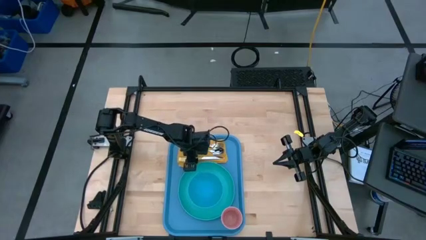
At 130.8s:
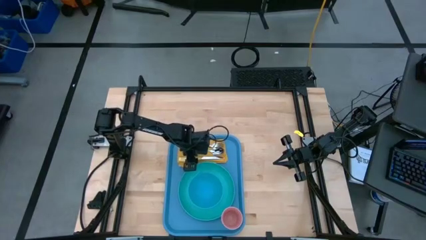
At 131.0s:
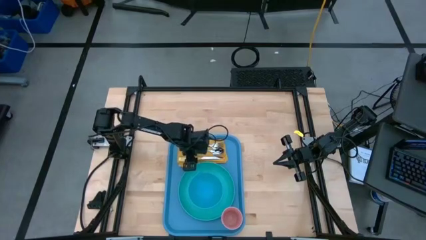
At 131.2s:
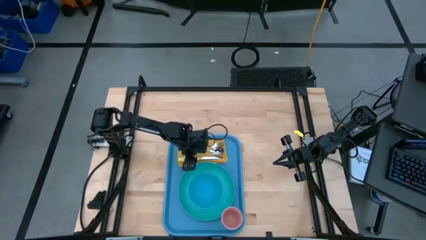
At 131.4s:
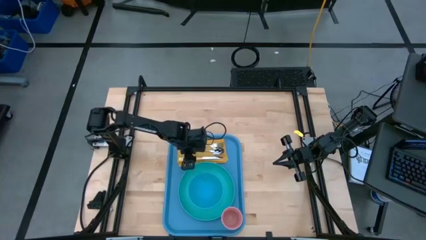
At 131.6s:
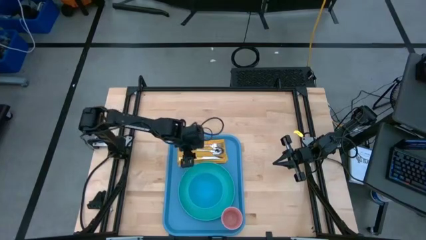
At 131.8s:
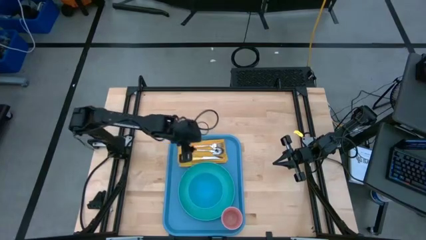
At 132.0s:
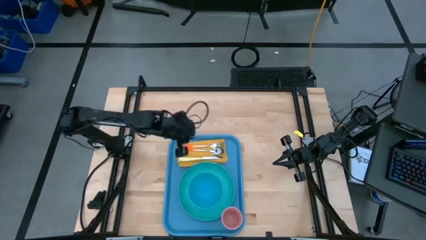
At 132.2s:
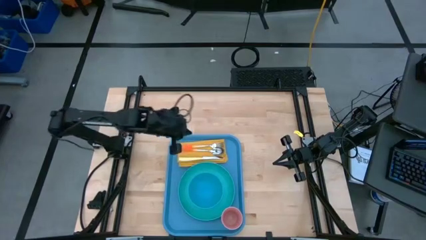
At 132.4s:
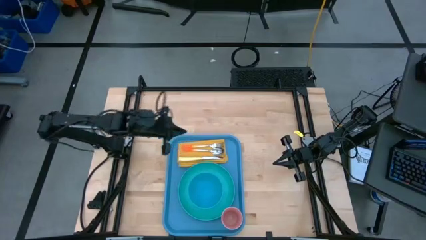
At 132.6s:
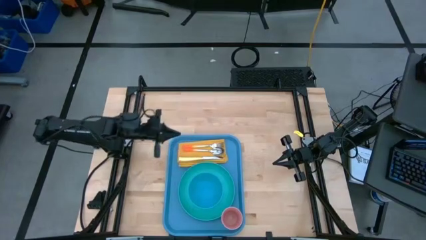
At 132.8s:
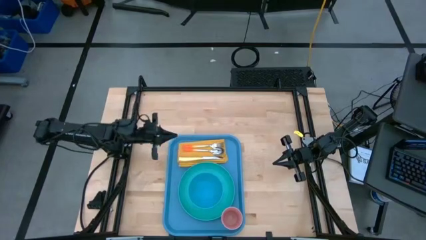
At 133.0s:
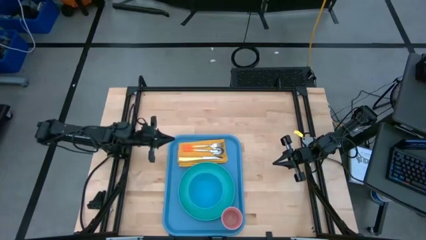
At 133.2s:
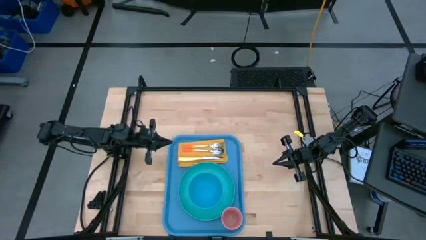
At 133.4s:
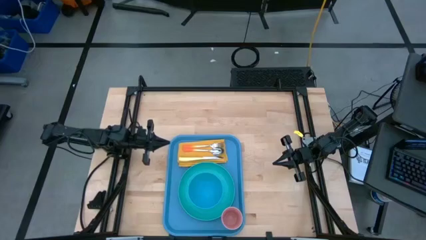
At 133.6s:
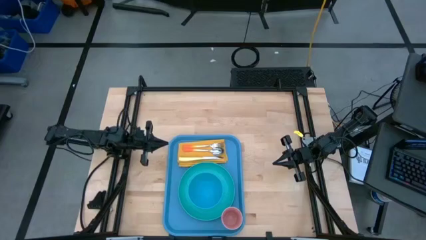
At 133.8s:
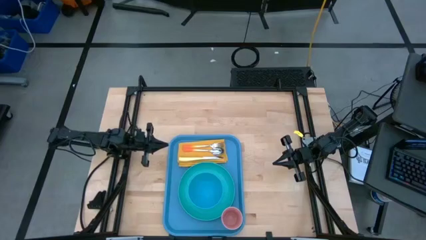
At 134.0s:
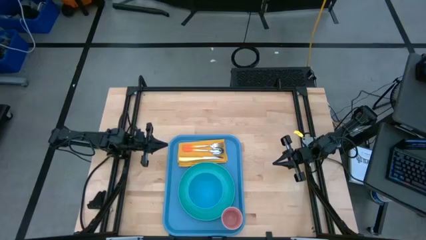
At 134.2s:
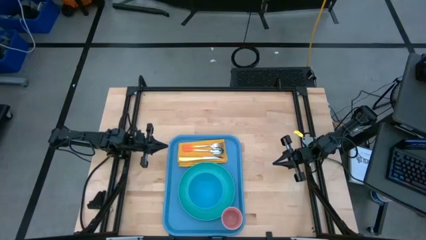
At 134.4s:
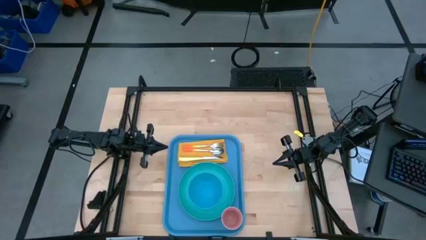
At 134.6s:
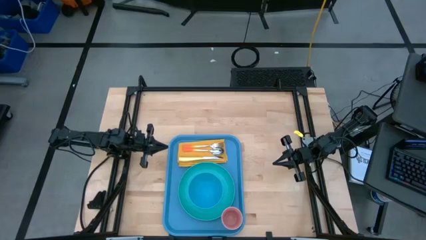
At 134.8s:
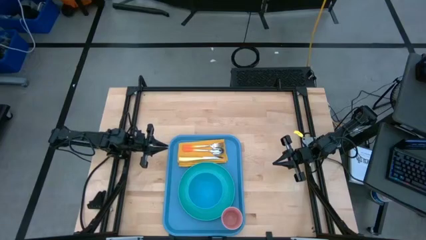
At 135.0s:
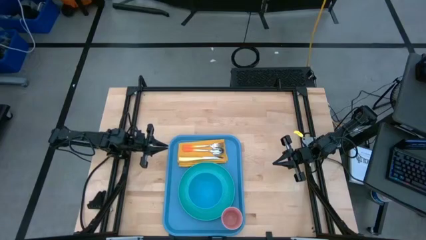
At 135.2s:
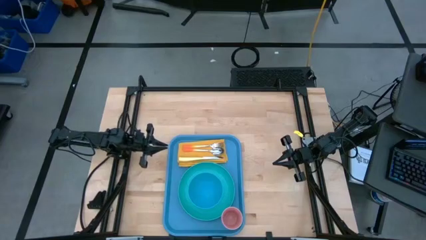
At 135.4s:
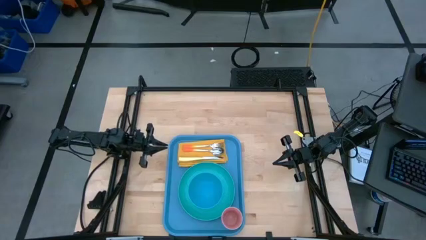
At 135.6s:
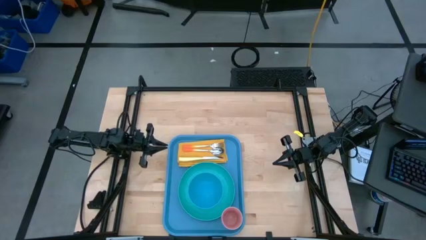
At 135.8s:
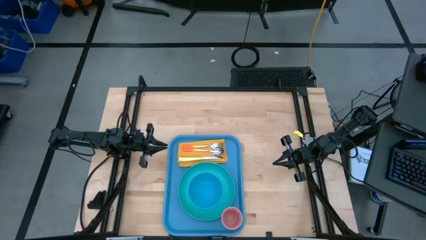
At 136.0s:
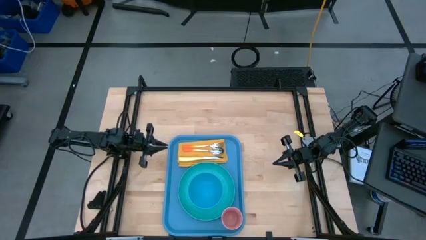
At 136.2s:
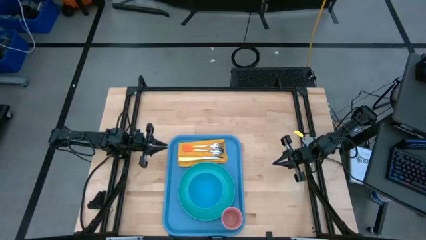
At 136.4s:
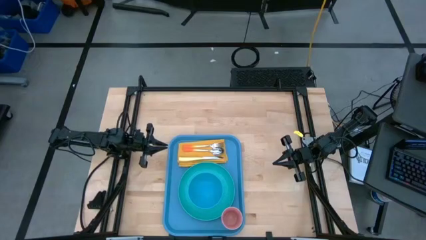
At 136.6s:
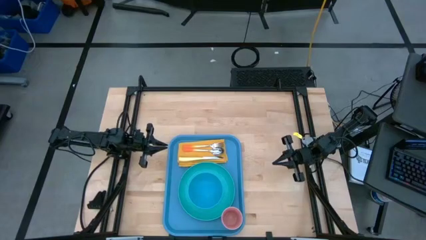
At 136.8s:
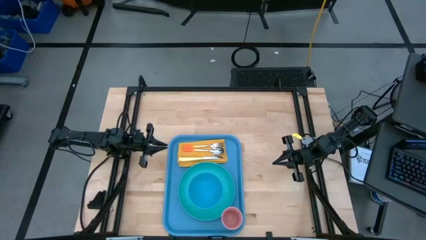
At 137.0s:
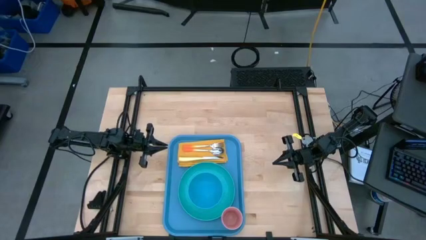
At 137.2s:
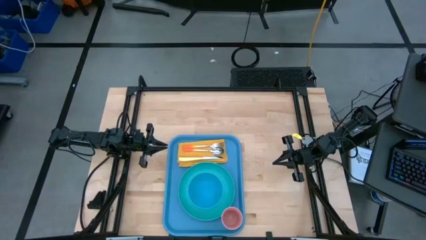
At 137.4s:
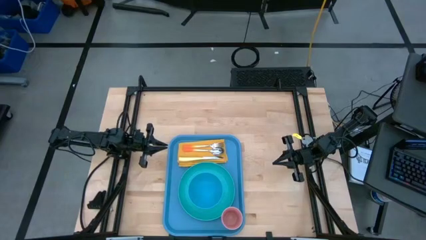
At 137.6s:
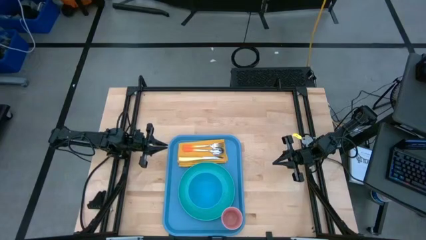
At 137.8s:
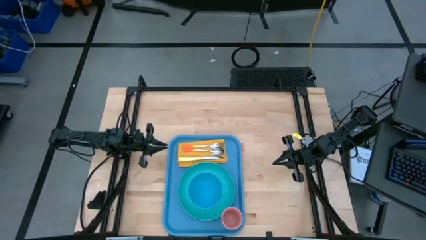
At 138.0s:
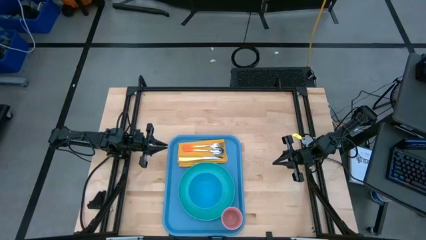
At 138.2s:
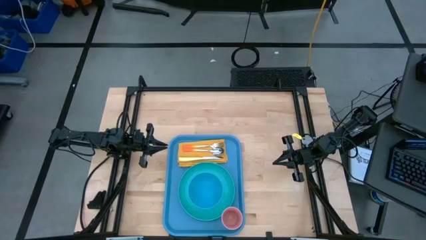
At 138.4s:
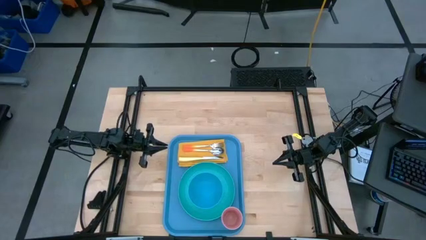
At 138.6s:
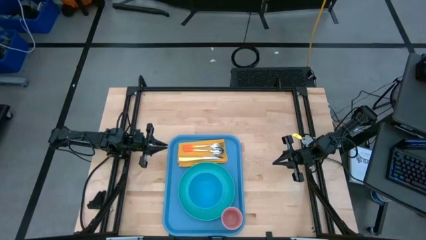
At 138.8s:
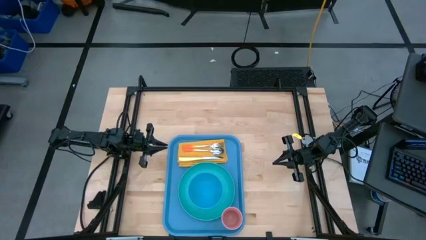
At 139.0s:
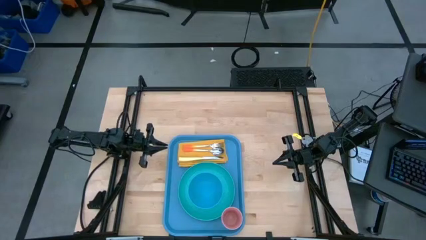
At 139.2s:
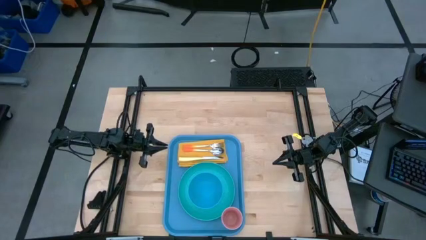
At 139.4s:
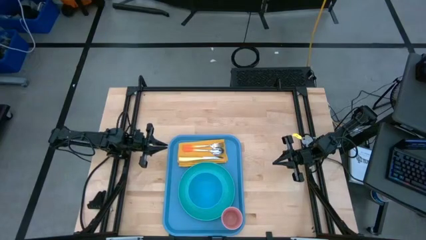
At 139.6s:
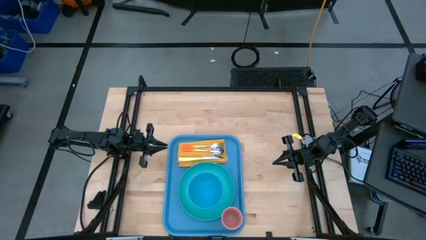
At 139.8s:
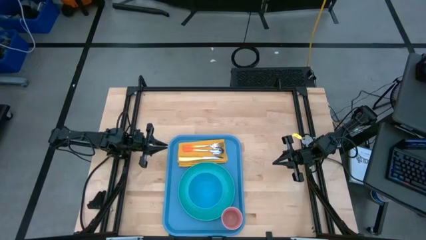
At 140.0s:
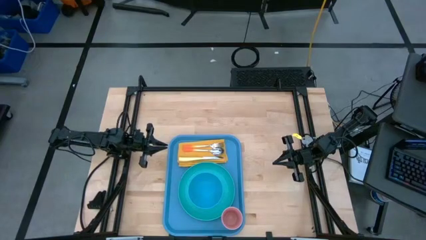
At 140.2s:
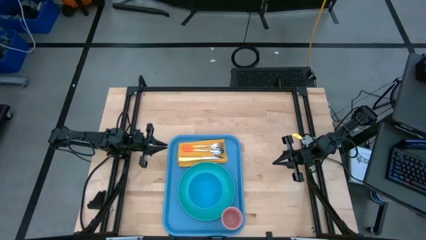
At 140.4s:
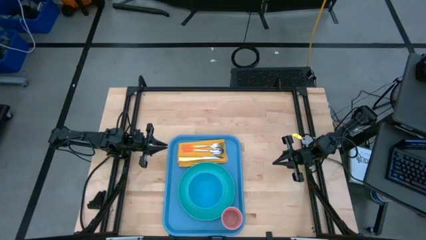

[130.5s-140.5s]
Task: Set up tray
Return to Home Position

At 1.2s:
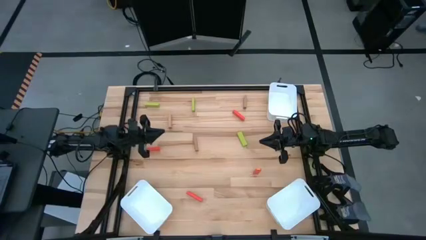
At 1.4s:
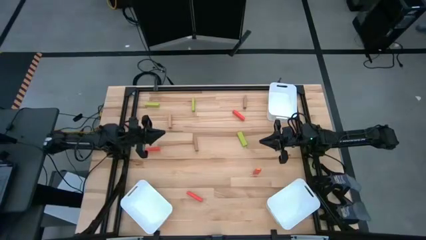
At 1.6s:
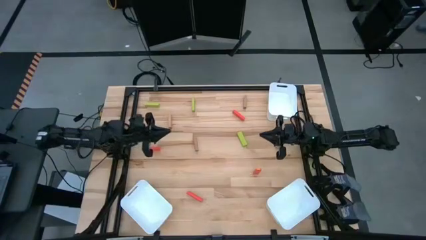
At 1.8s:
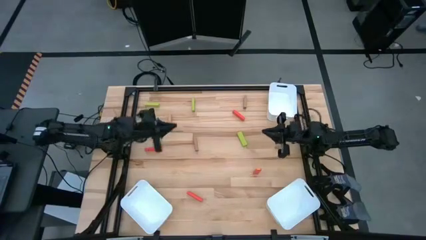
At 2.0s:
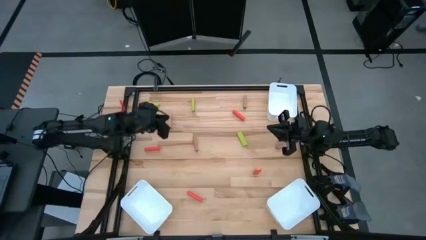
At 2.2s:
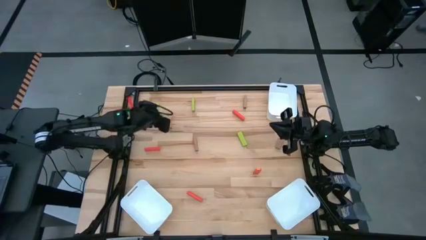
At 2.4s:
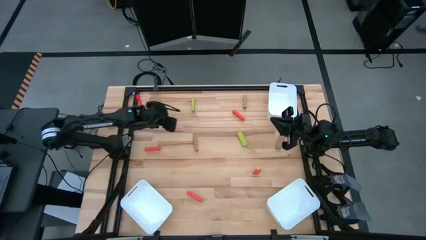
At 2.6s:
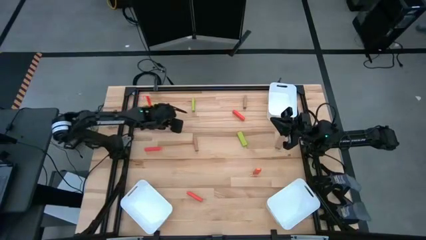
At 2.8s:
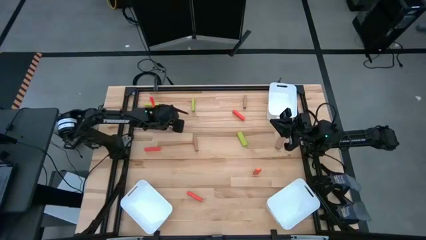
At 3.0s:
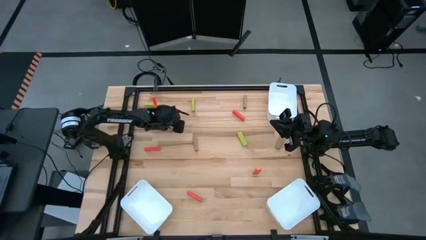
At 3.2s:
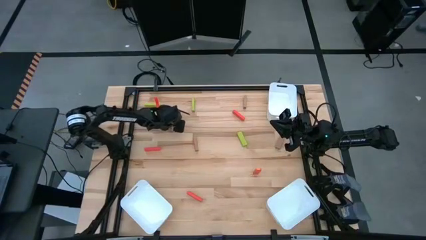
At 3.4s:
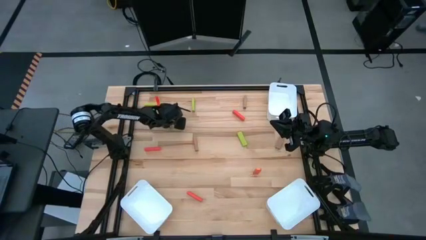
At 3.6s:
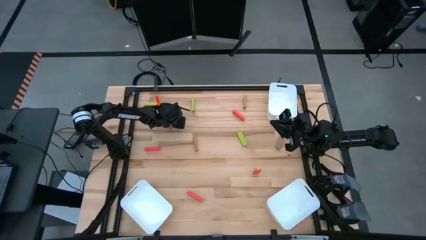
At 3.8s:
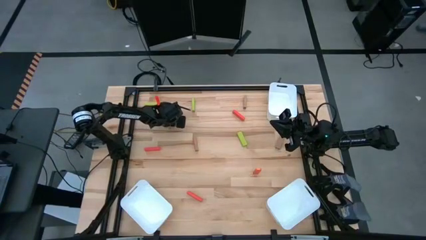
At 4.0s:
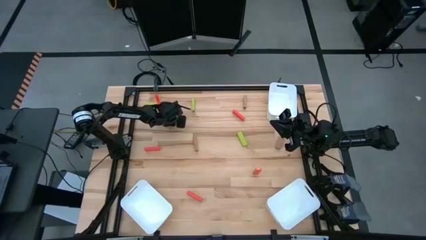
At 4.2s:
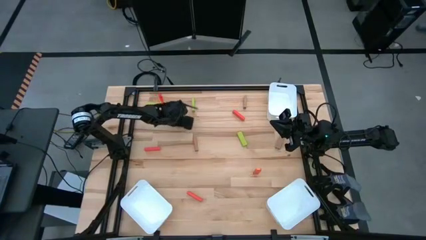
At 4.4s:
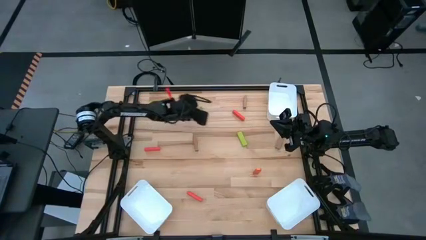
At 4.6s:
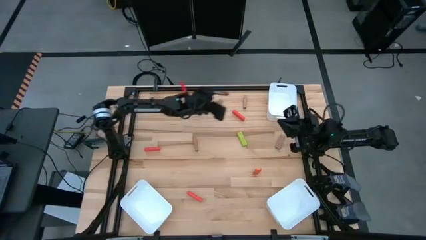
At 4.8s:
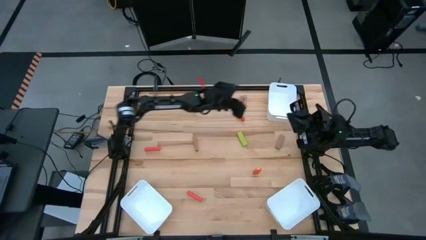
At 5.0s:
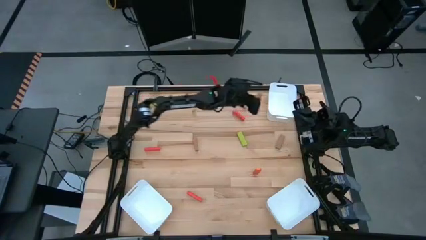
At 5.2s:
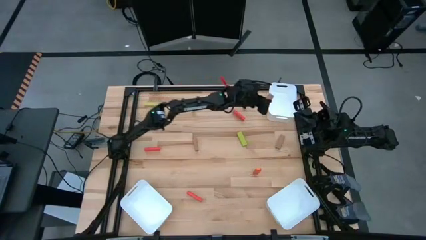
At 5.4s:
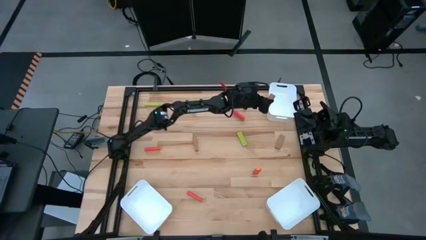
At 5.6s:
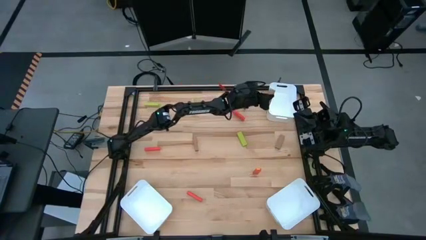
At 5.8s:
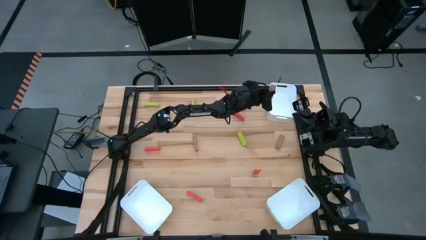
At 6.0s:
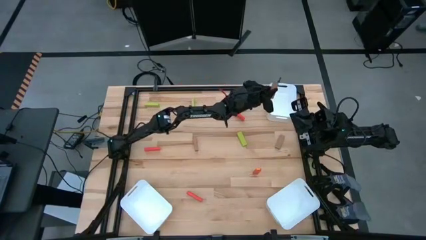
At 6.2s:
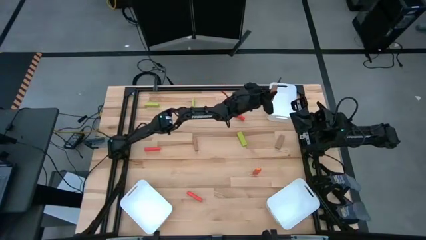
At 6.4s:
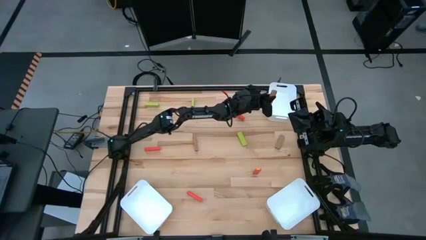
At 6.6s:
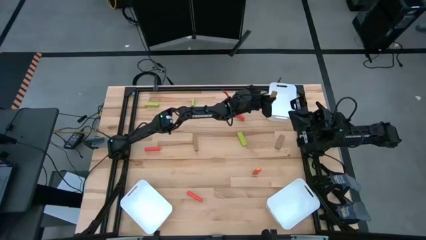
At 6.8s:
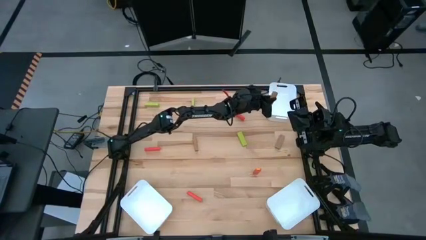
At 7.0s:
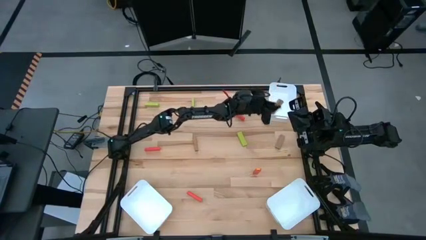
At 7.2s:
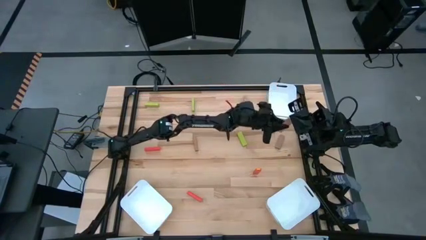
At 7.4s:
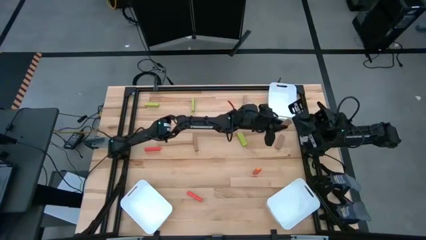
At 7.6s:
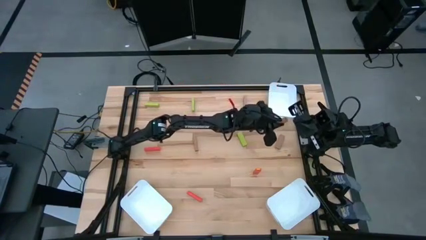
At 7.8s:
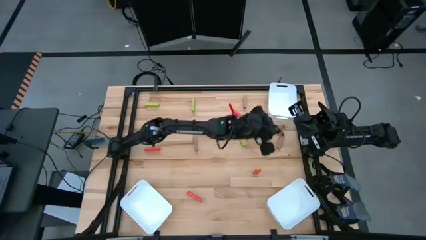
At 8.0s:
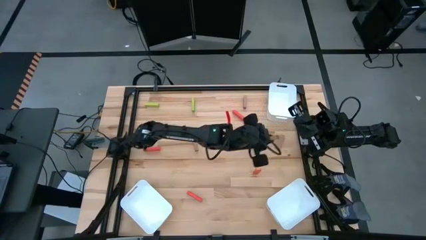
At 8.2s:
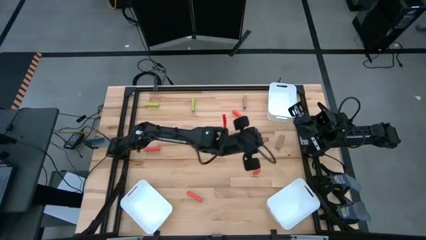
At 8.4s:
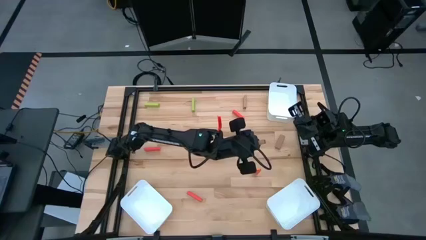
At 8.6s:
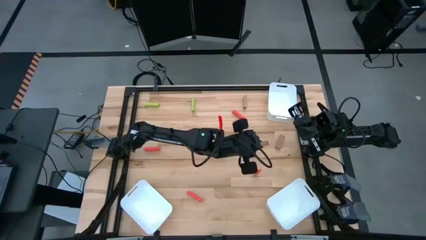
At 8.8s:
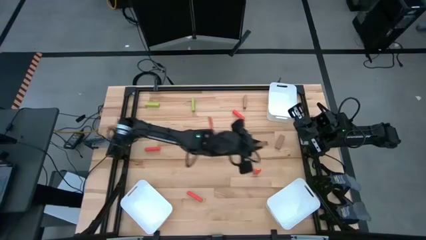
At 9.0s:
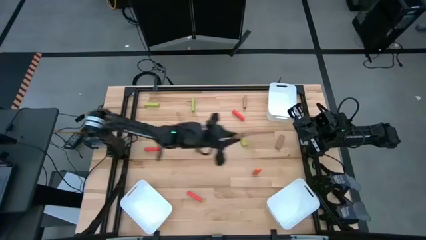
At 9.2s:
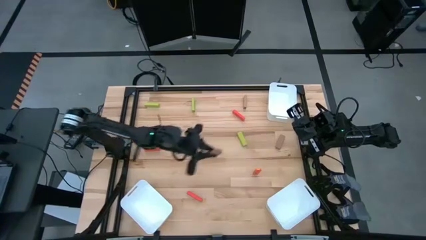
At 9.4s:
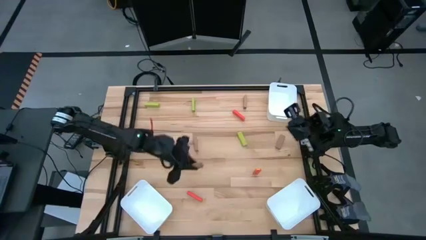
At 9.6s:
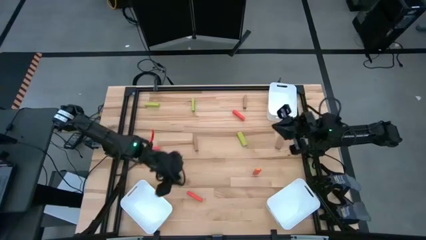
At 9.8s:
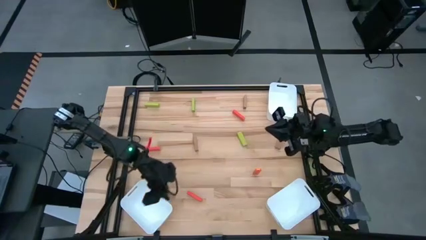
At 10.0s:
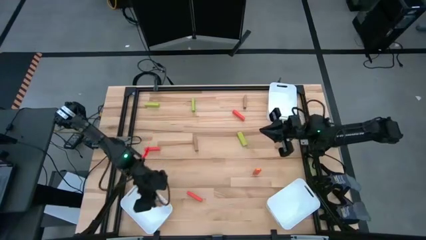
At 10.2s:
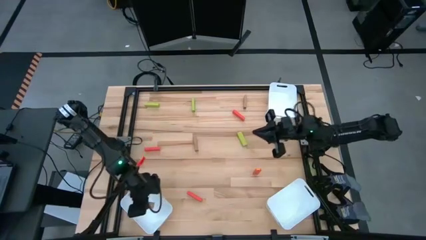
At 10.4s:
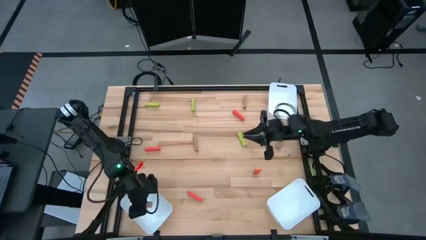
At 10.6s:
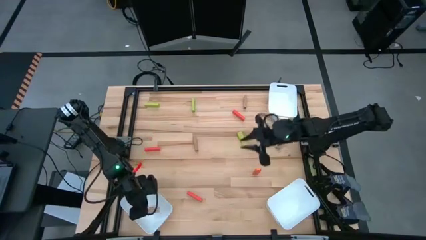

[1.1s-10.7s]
Task: Sort blocks
Put the brown block into the bottom left bin
